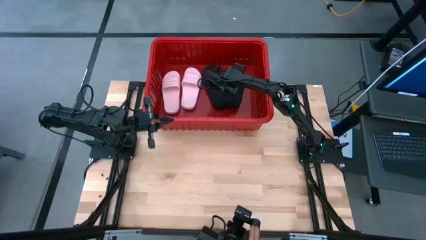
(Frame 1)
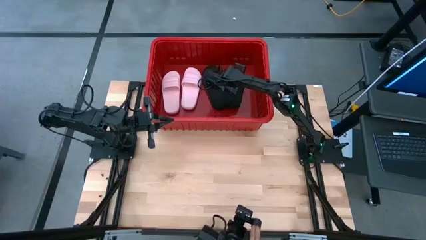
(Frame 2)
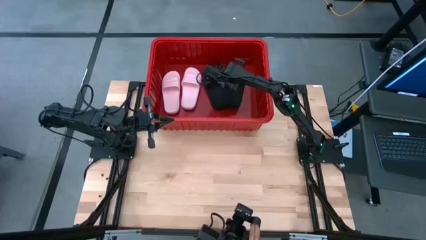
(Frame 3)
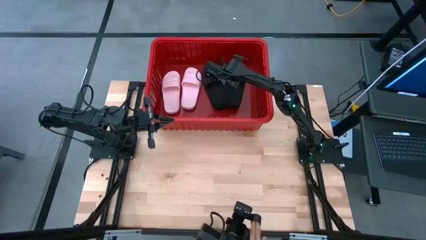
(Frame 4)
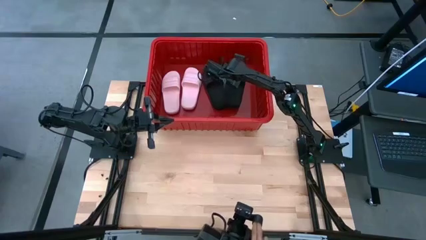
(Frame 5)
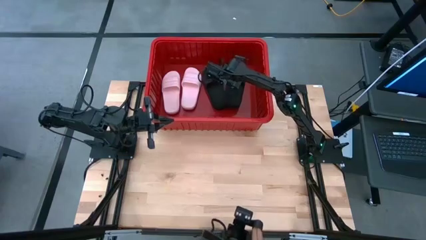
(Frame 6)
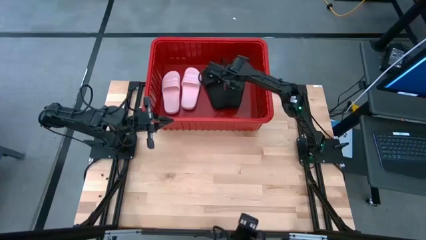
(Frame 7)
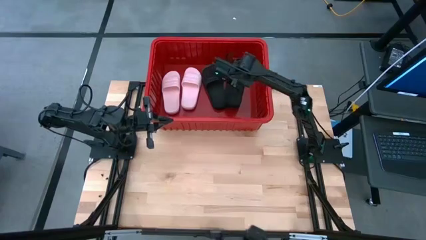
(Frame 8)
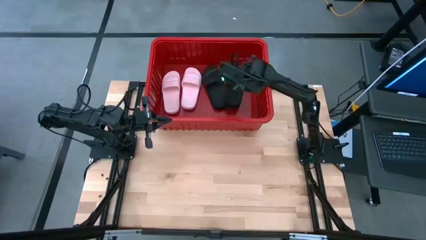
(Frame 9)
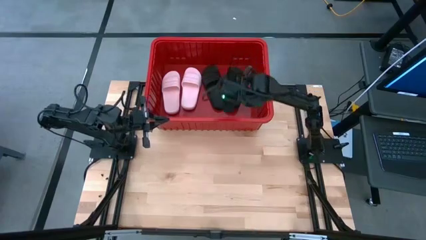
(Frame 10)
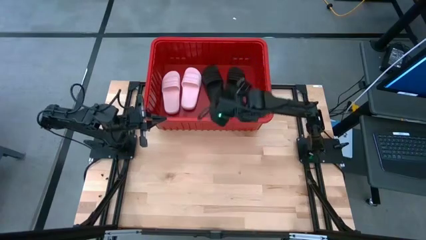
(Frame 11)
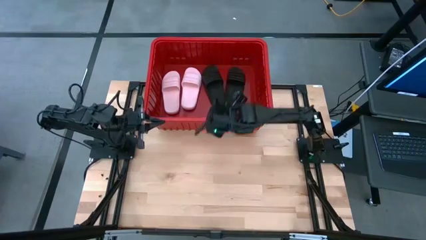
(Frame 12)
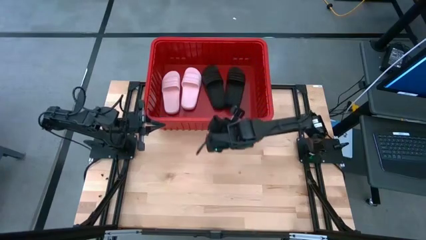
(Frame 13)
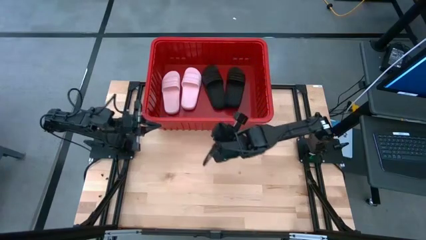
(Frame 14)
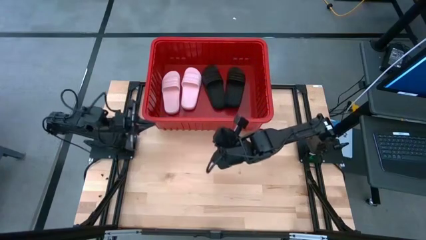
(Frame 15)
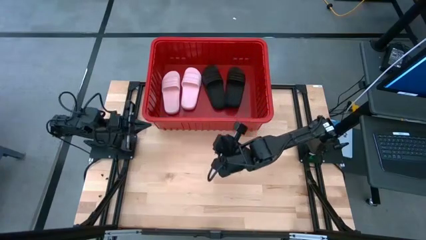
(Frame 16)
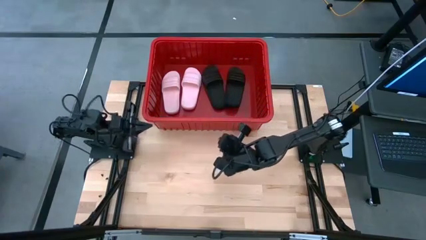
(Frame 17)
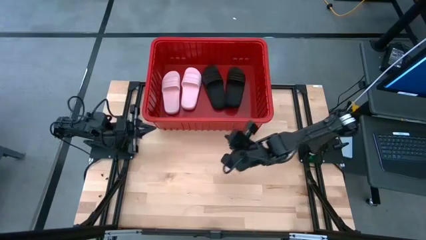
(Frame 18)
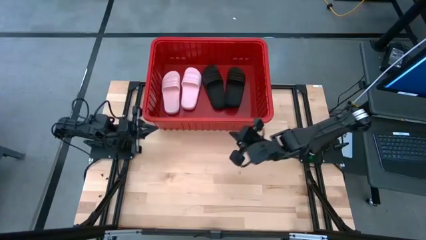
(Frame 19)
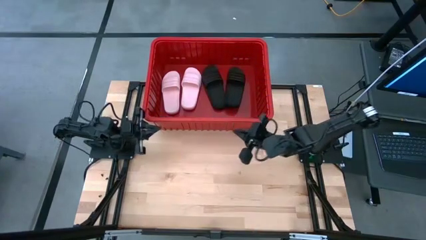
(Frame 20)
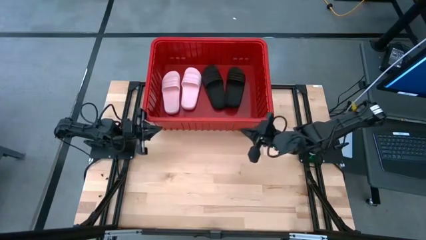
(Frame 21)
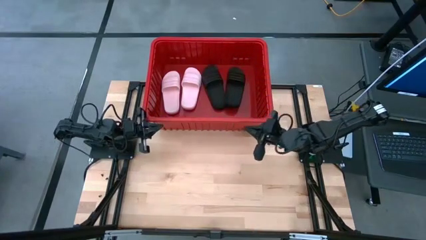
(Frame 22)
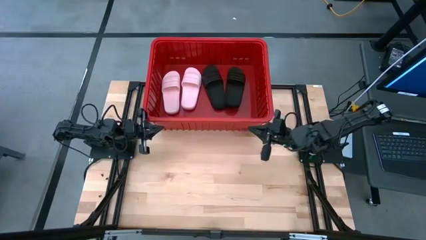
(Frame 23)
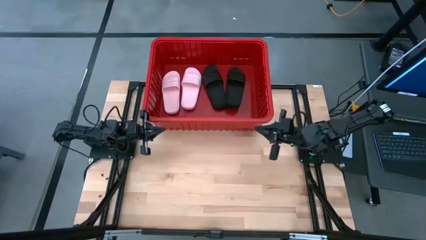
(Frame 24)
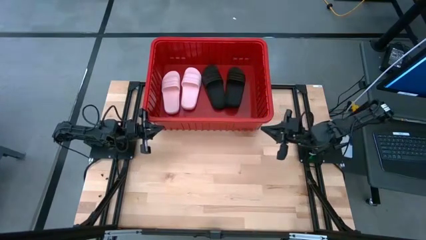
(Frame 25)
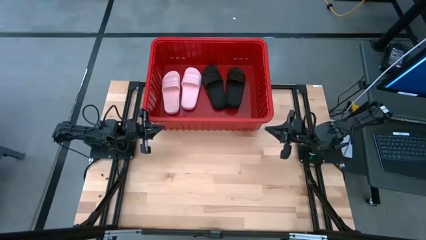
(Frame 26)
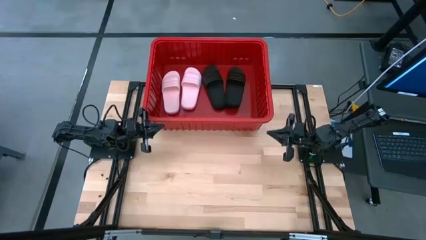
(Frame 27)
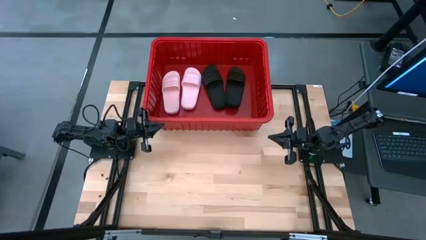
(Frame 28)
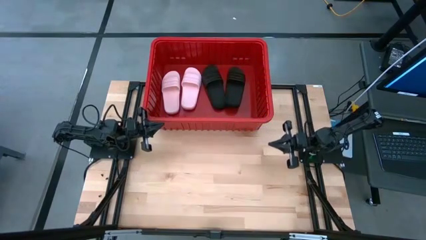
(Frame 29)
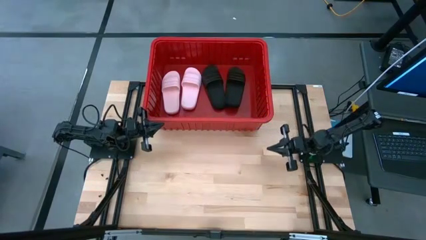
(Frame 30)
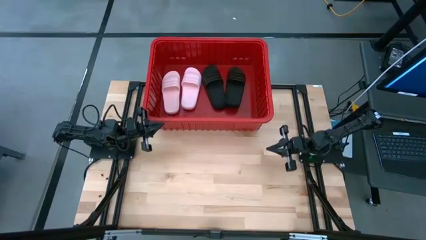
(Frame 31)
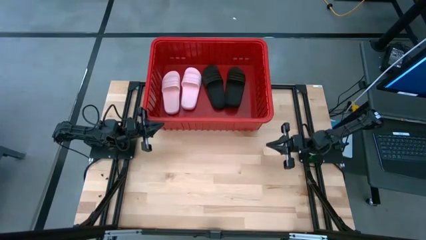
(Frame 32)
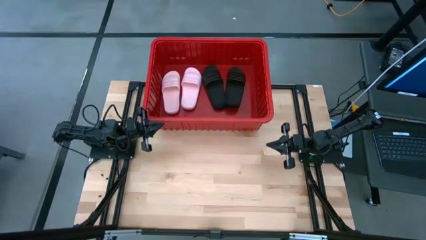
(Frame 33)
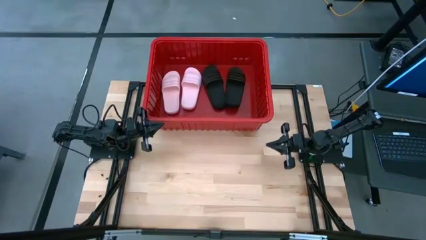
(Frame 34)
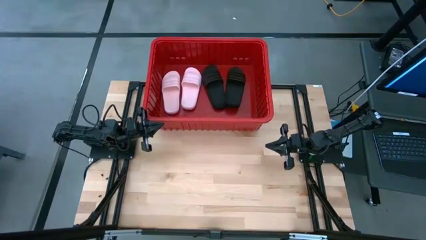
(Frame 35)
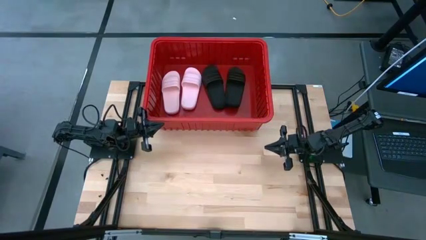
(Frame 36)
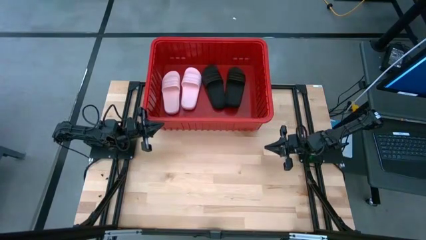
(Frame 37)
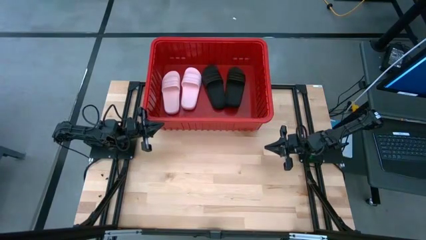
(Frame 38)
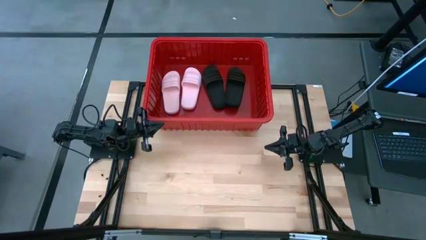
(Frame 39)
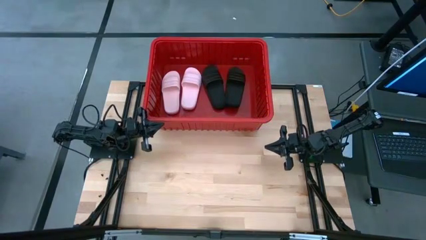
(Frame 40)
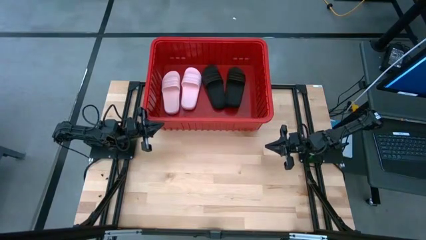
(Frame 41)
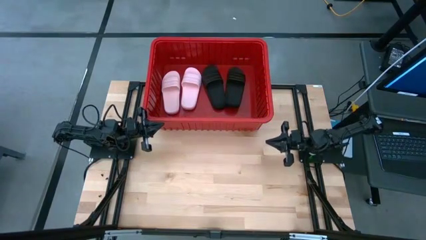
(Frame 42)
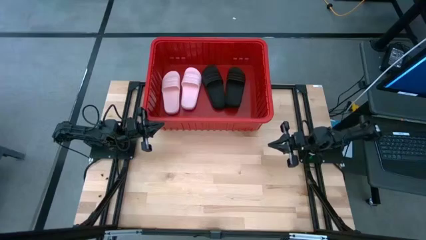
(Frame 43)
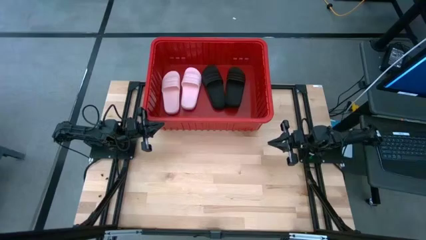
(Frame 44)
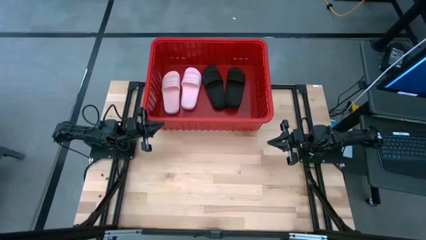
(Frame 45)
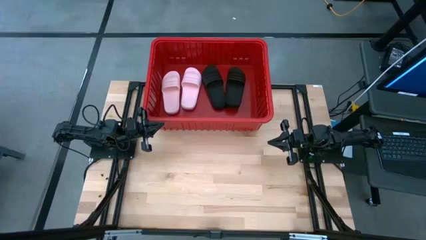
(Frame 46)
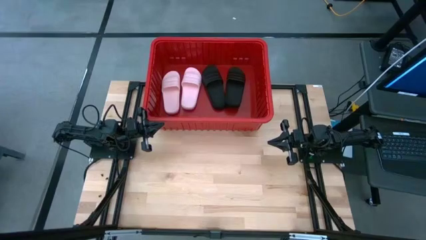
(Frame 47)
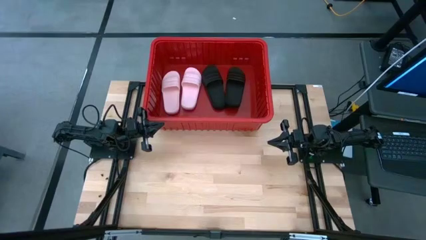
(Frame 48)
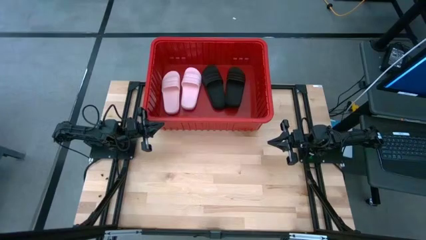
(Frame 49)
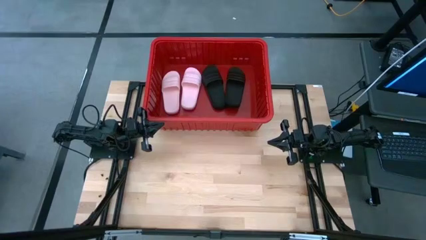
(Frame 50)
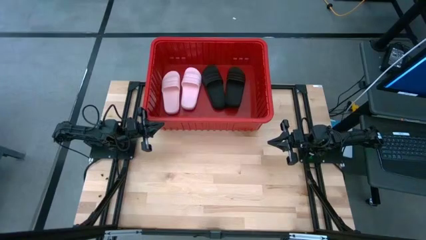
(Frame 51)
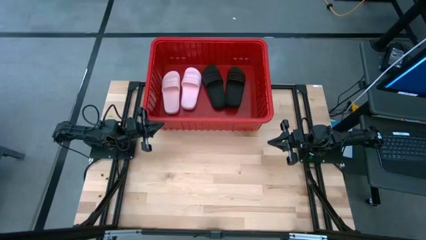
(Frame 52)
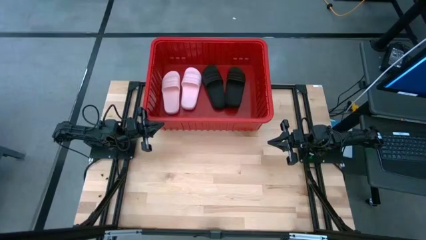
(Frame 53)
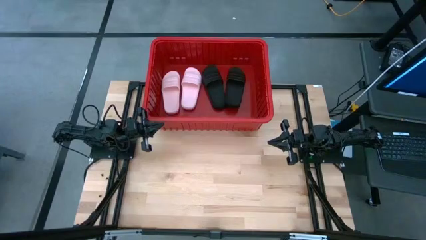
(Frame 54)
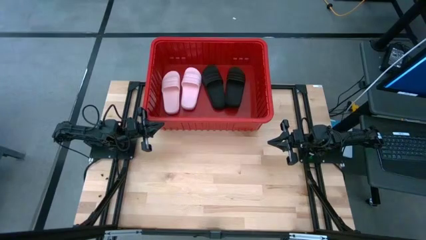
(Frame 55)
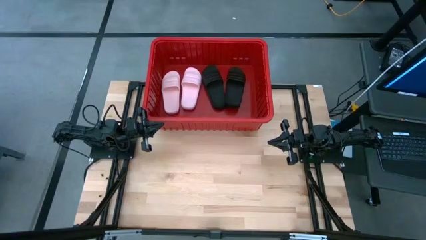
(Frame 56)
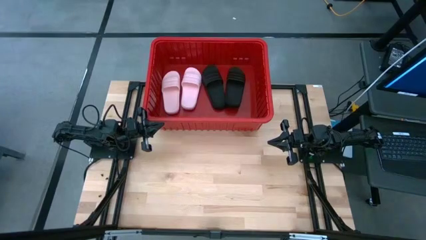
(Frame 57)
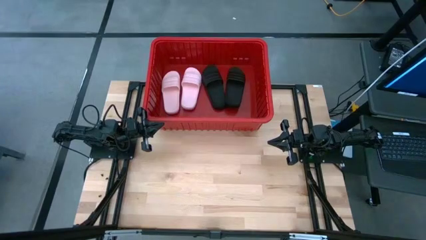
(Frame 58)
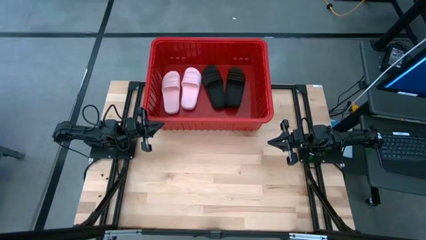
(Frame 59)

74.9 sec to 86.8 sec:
Task: Pick and place slides into bin
Return to Home Position

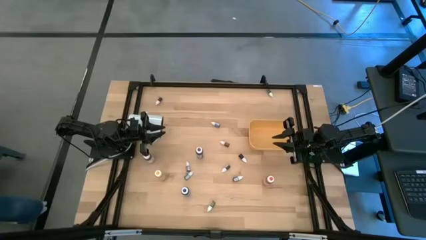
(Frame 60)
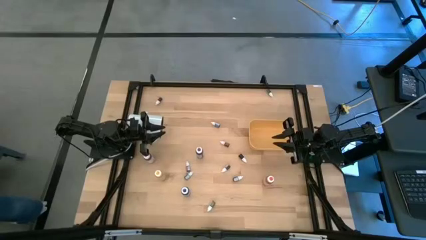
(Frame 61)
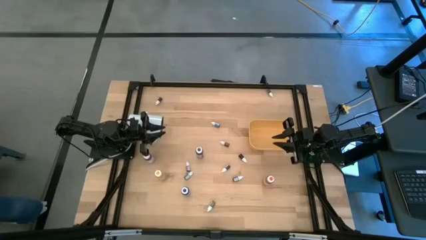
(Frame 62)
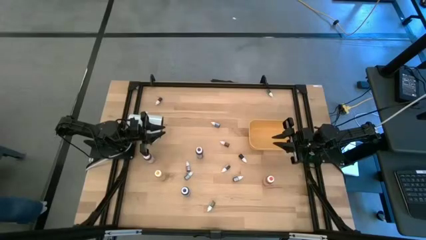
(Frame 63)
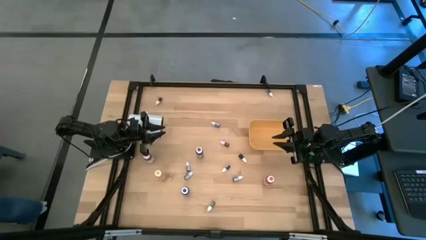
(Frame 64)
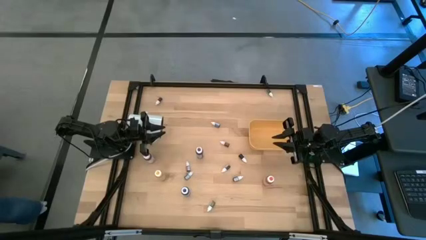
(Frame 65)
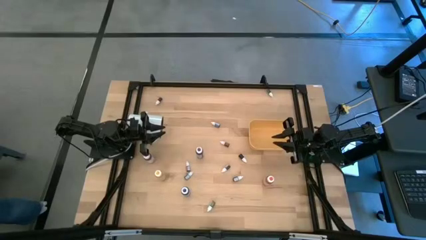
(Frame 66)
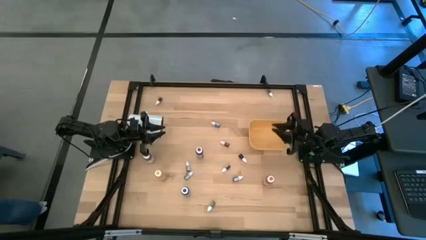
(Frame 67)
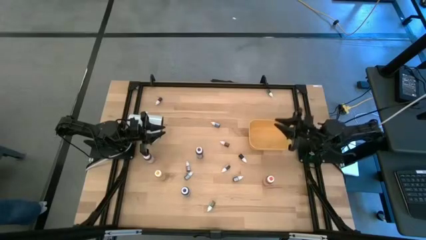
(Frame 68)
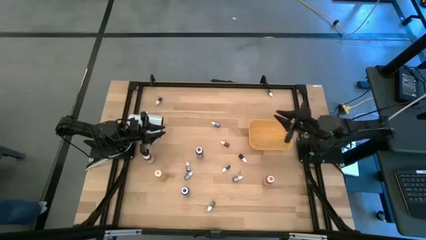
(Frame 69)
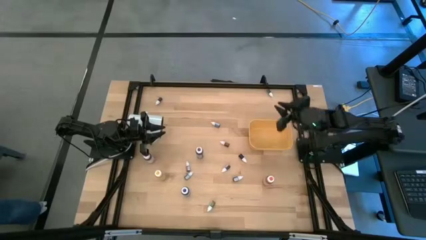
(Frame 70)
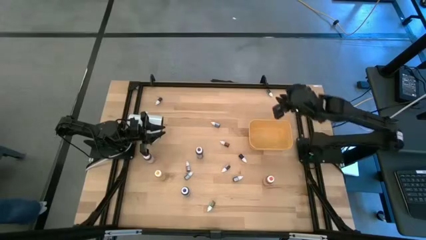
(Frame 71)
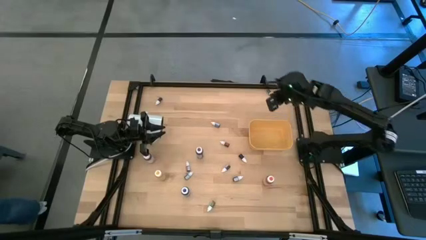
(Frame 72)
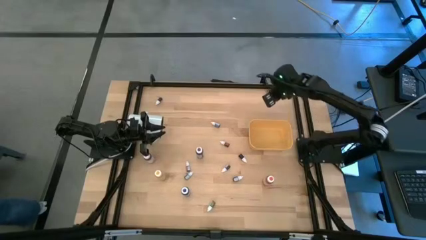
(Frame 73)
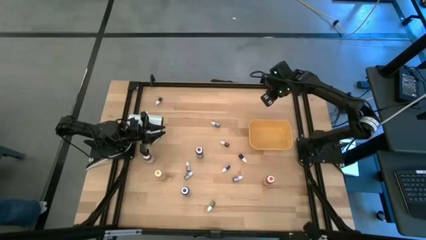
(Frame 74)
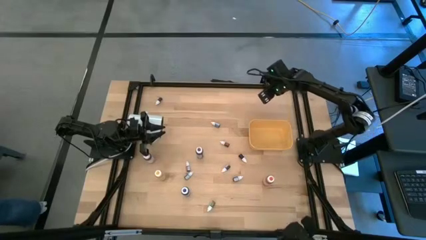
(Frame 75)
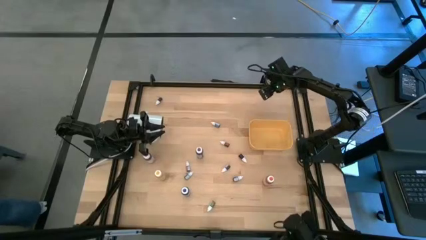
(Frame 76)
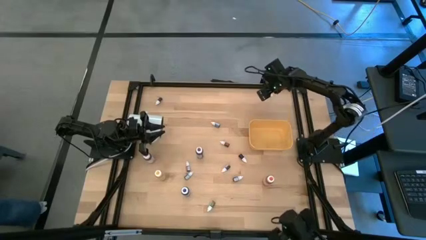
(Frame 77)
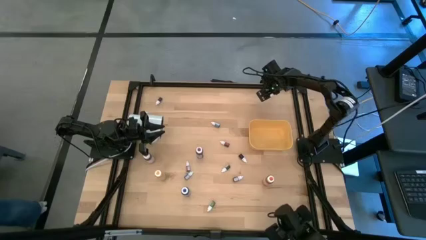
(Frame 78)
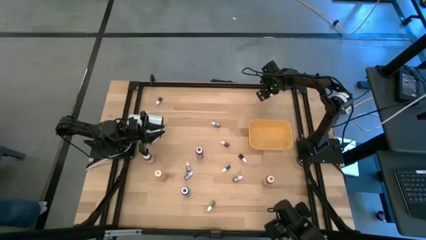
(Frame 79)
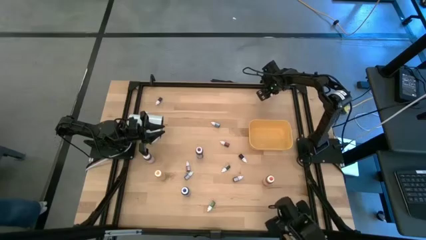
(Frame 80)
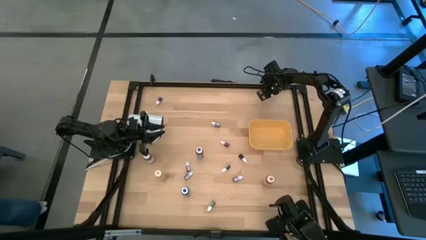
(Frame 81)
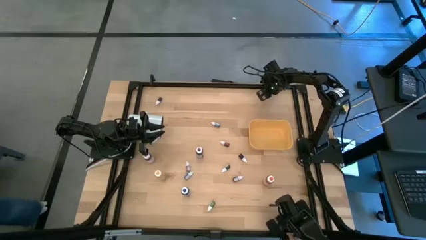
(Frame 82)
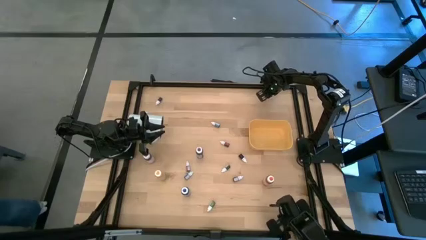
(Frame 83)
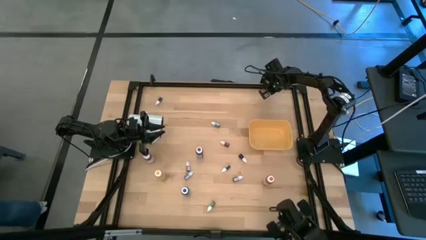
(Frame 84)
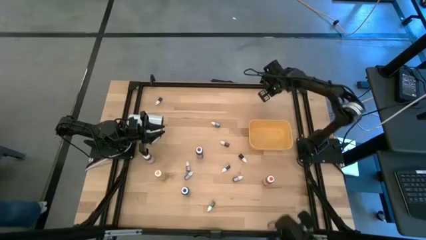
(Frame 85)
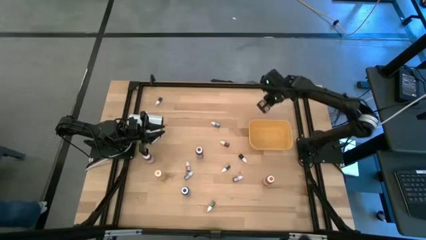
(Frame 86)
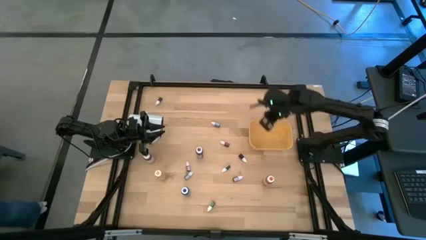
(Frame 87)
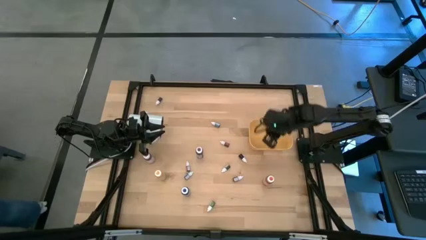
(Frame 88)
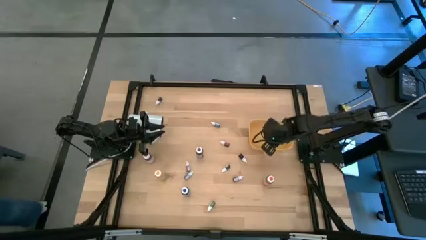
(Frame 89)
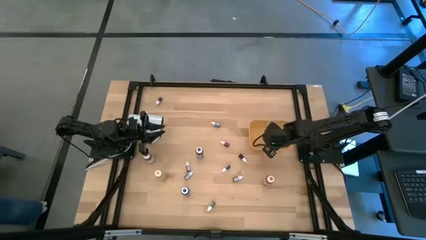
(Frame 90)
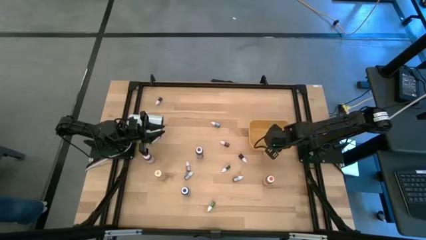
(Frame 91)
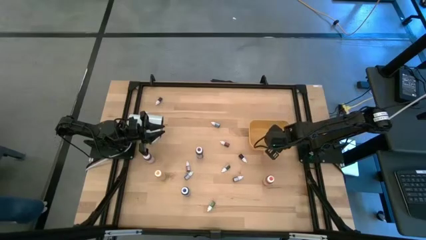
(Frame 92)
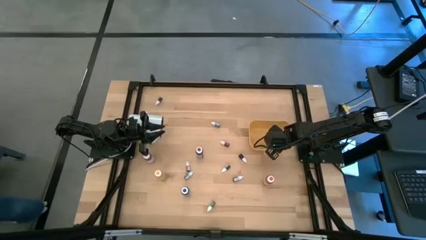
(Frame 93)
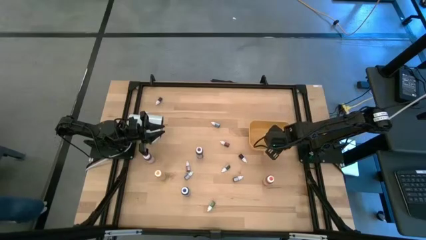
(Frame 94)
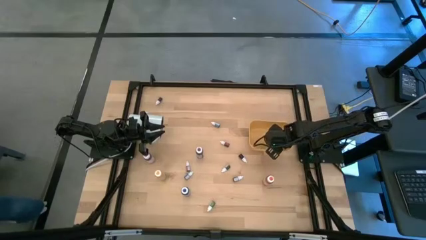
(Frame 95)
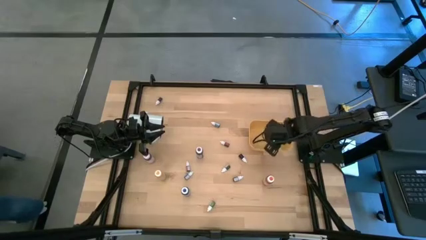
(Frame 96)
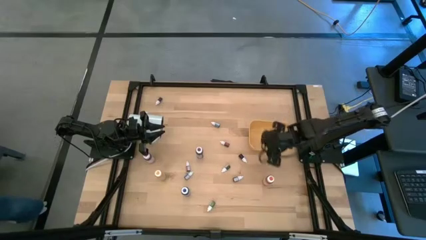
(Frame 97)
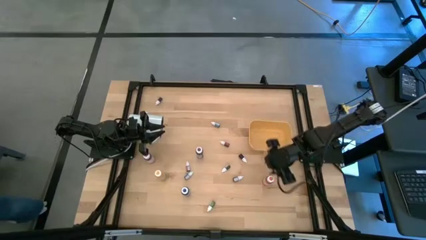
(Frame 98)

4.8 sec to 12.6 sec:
Task: Pick & Place food coloring
Put the green food coloring bottle into the yellow bin
